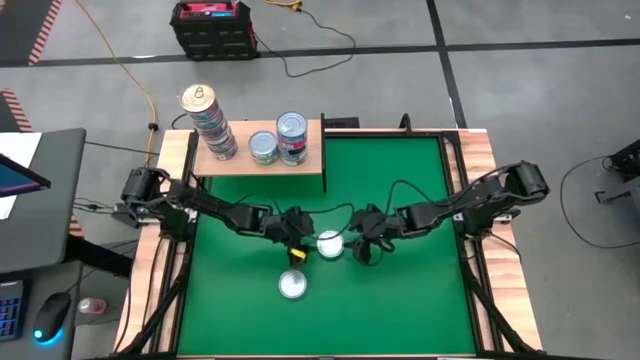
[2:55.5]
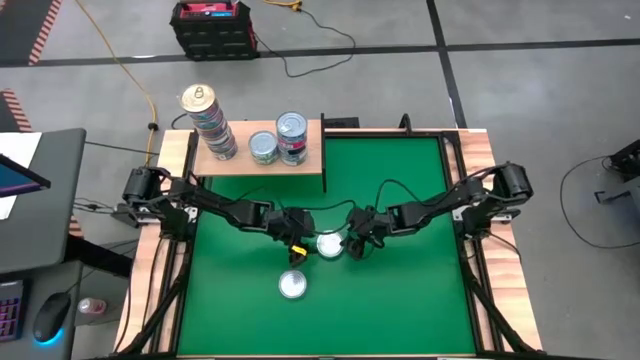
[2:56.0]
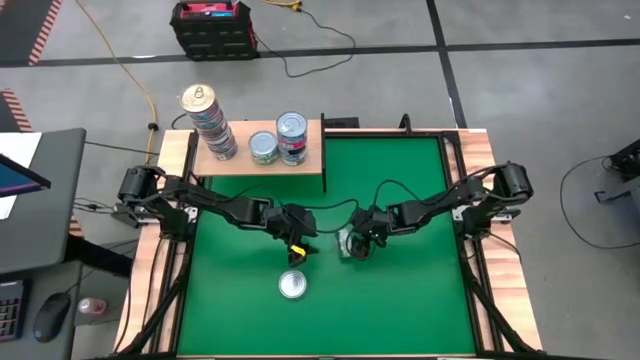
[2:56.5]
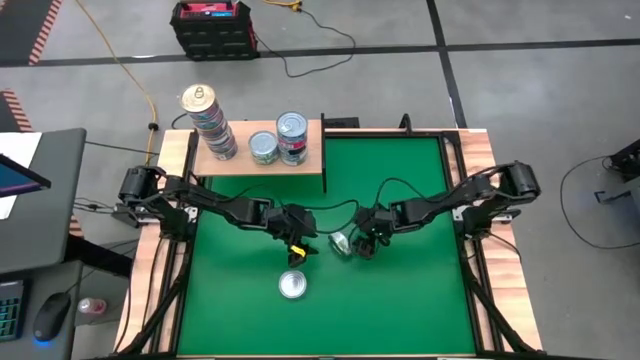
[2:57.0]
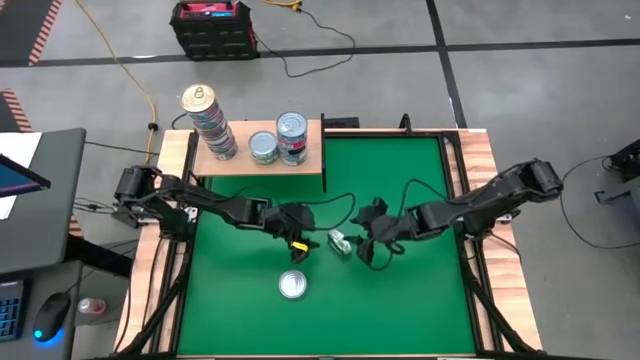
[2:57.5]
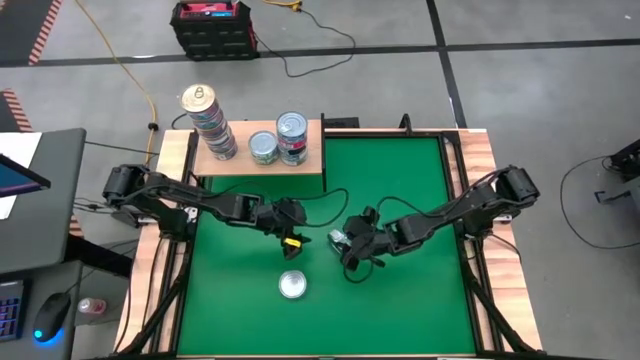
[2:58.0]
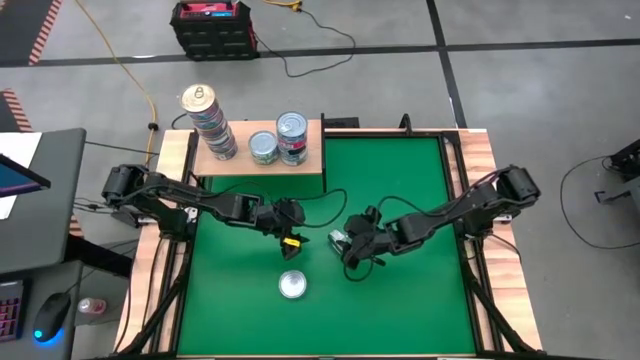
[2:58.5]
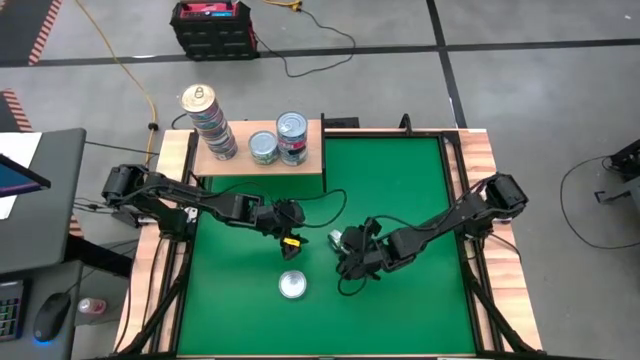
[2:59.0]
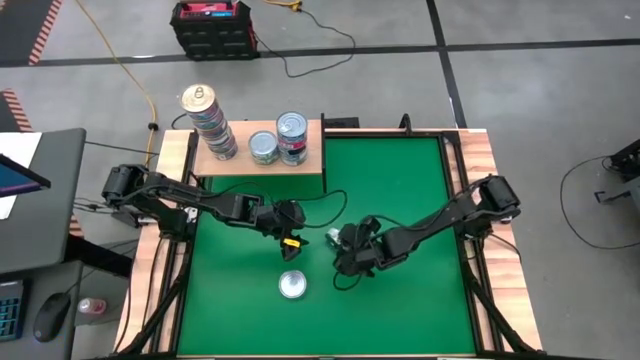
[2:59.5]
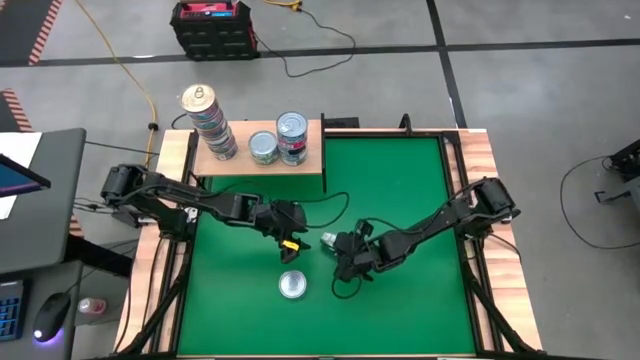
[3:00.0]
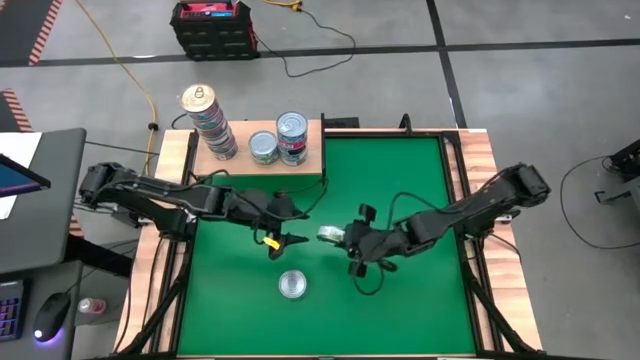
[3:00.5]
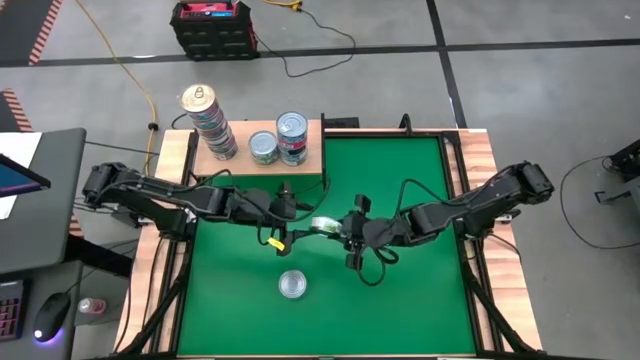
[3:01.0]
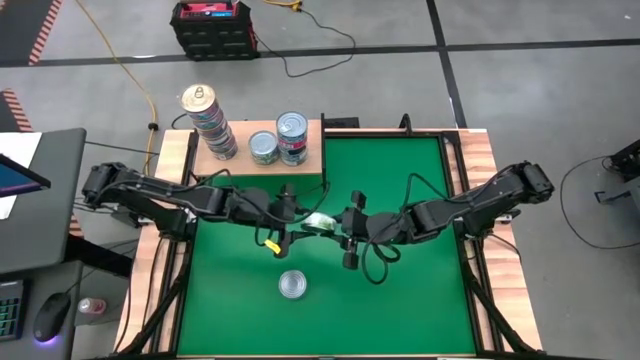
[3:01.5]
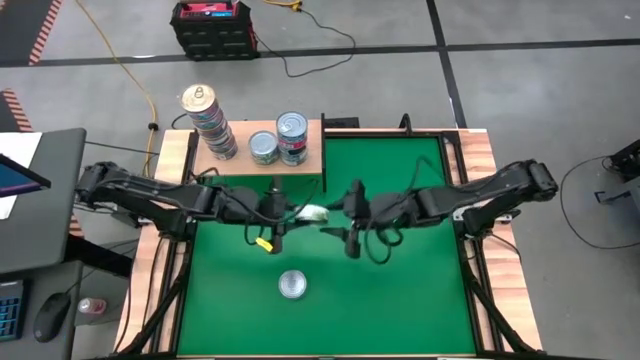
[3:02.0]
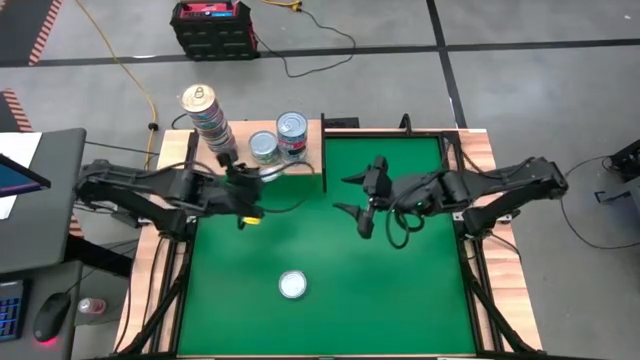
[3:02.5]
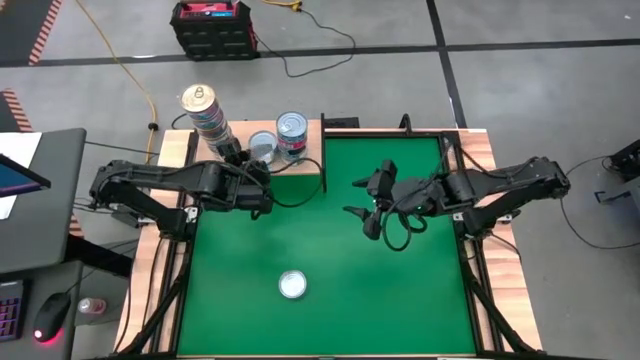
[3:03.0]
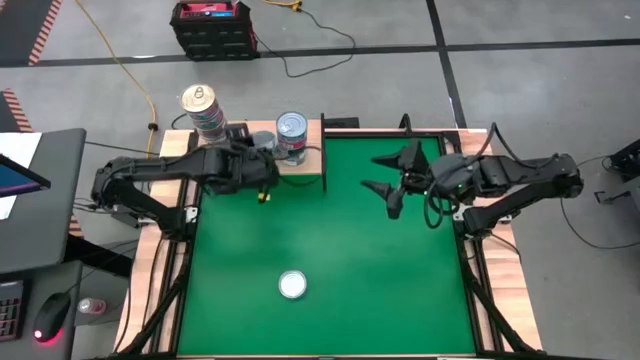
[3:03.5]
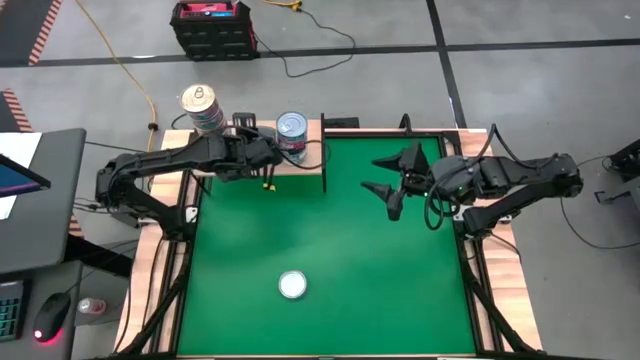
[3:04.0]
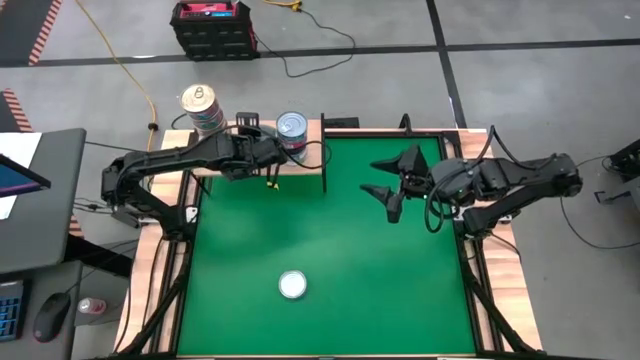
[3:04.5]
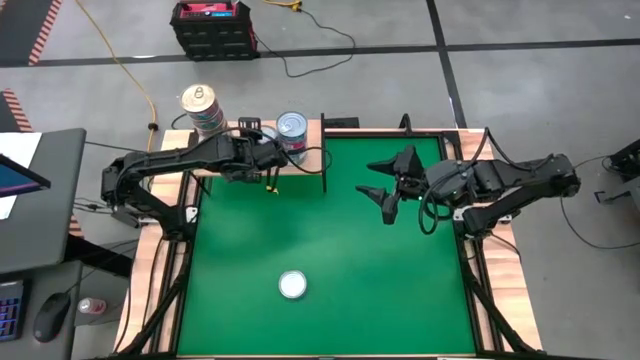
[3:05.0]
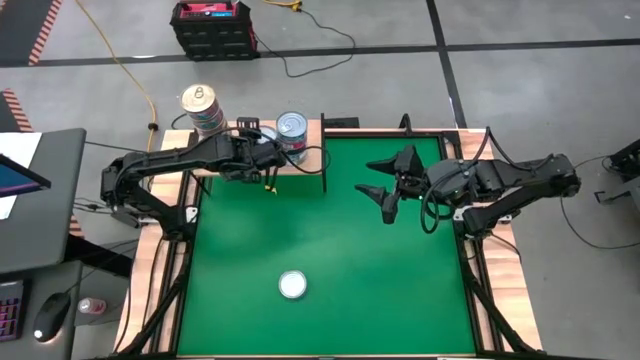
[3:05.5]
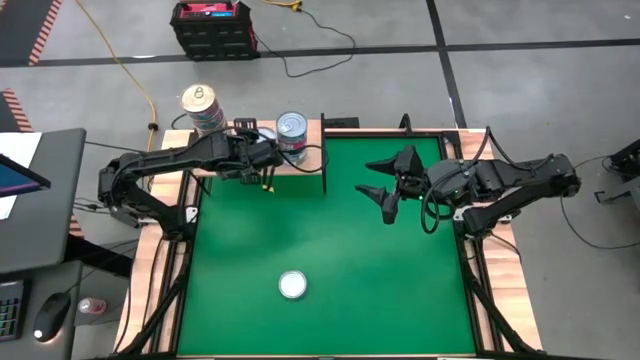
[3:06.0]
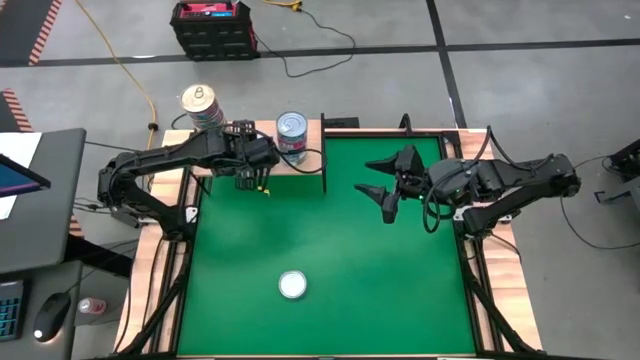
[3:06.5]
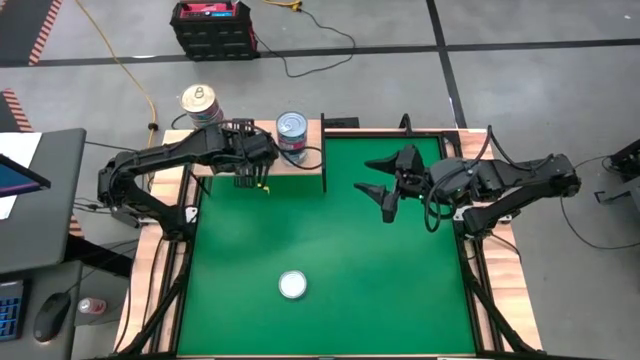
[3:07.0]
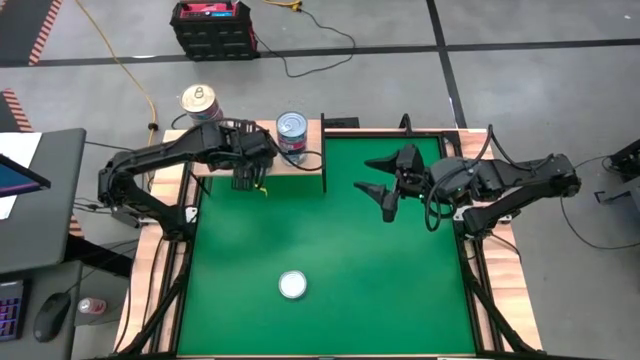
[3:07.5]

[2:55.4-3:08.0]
Task: Stack canned seafood by type on shelf
Stack the green tuna can on top of the green tuna cans on the shelf

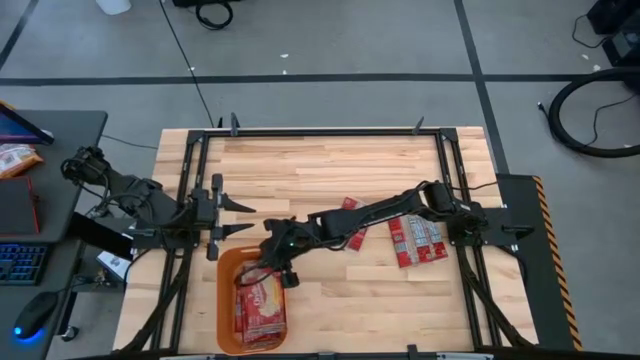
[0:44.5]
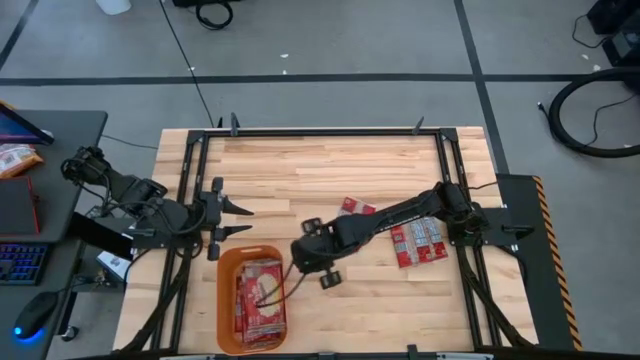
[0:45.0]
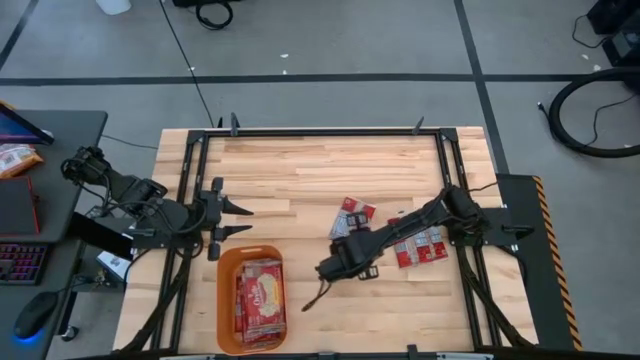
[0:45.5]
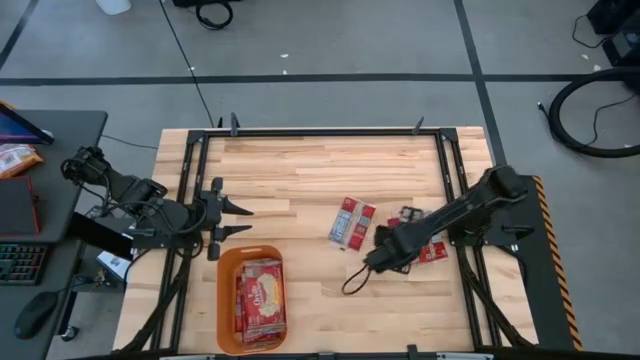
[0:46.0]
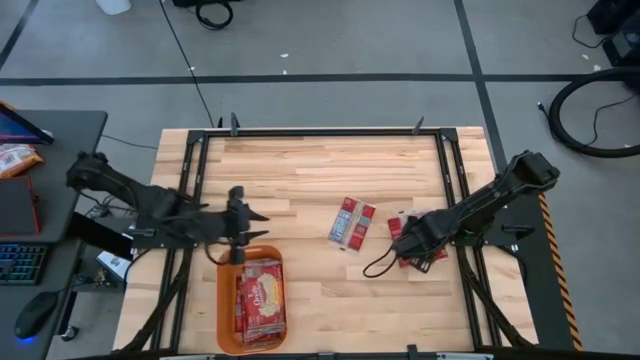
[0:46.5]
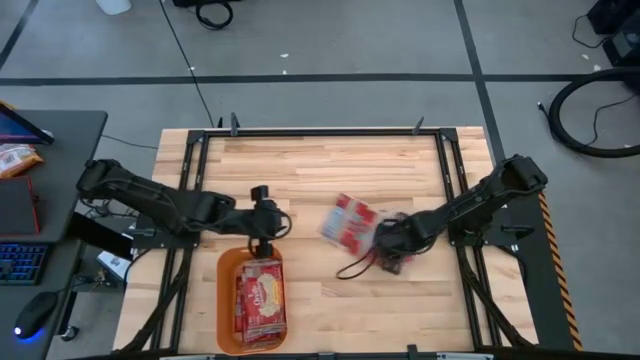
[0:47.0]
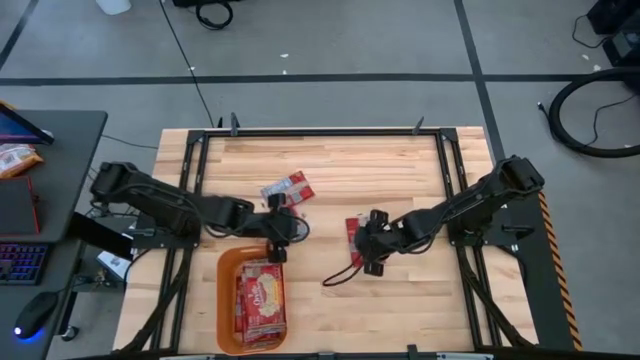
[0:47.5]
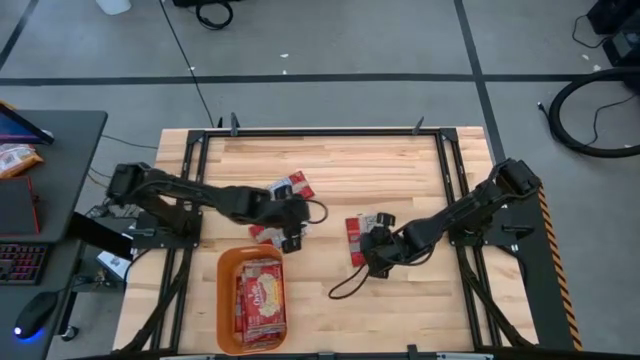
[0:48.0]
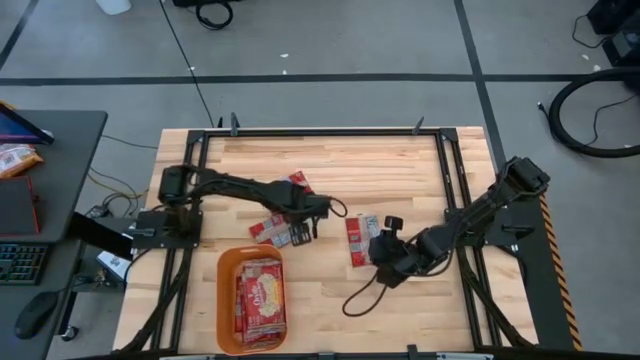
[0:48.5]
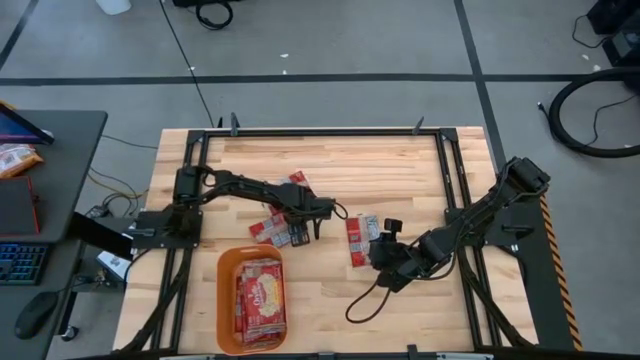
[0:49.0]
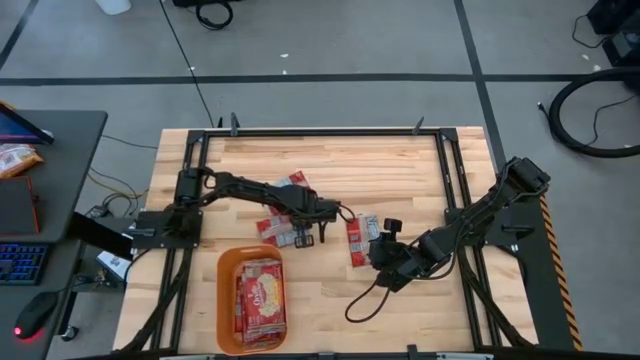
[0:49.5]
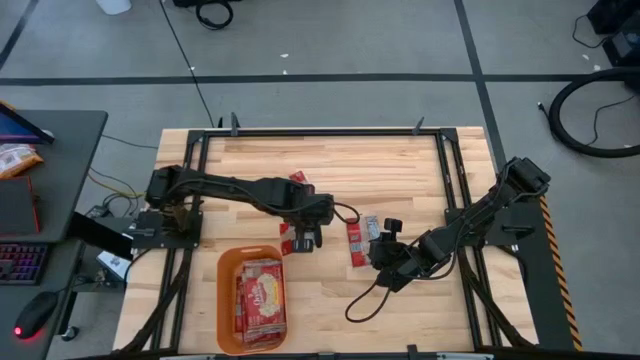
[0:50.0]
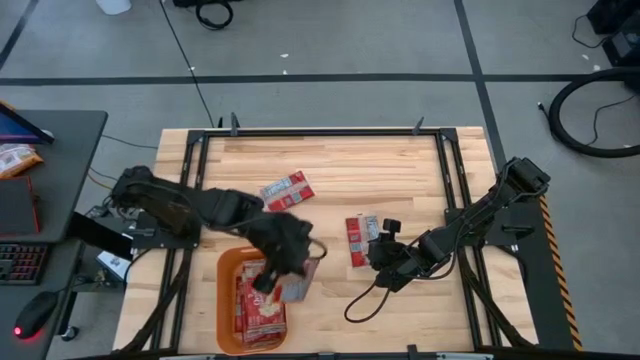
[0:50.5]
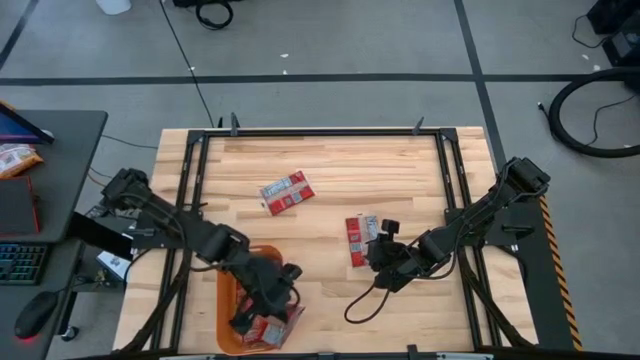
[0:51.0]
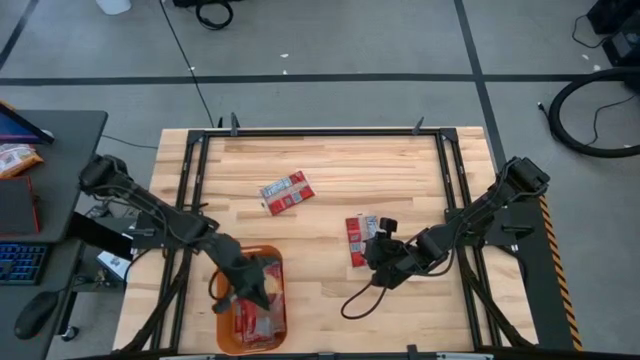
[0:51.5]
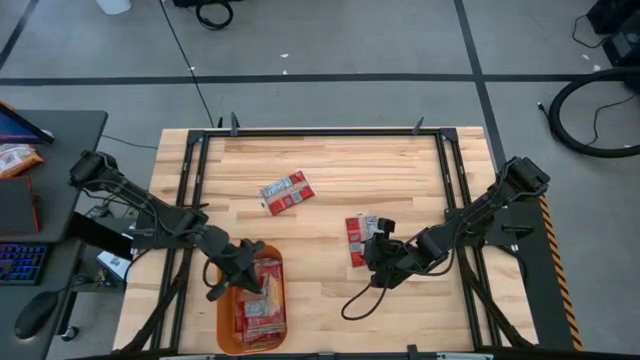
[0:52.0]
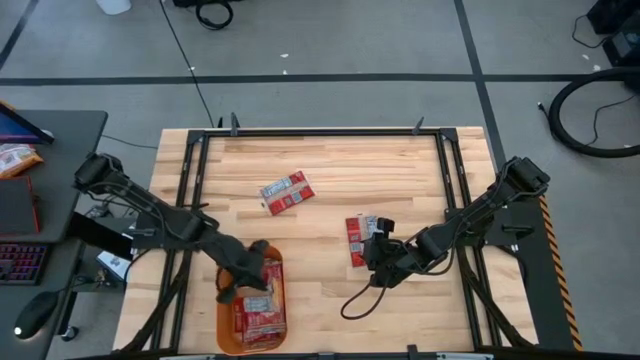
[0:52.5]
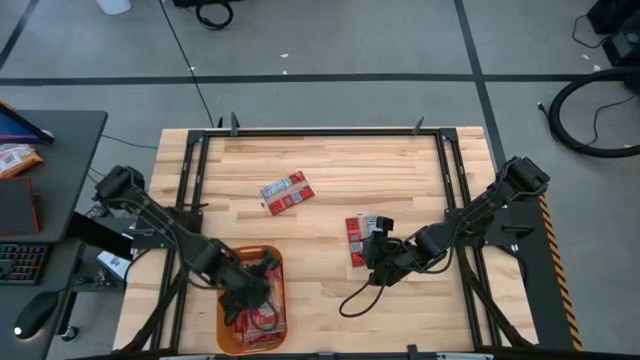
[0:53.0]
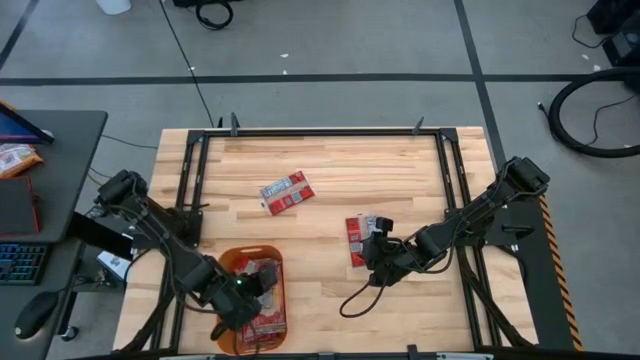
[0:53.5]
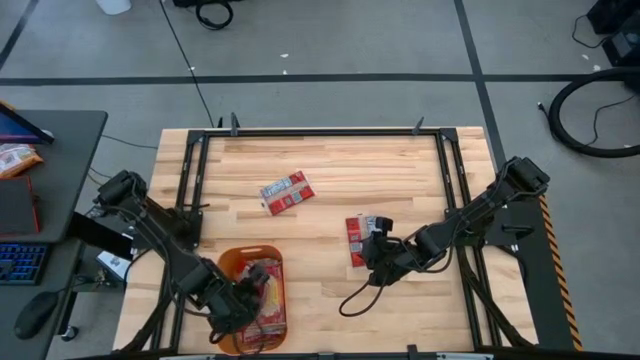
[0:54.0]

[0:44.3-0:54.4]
Task: Sort popcorn bags into baskets
Put the red popcorn pack into the orange bin
